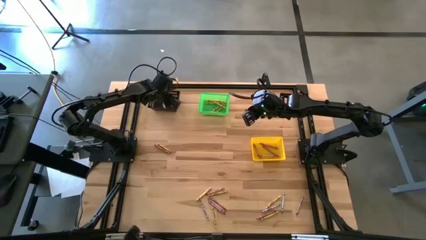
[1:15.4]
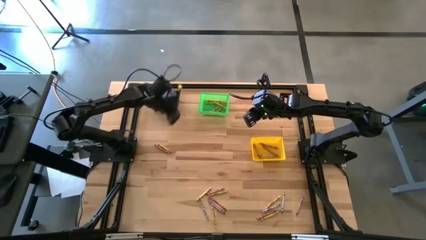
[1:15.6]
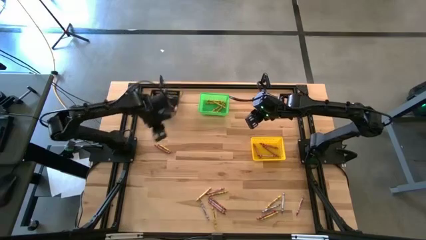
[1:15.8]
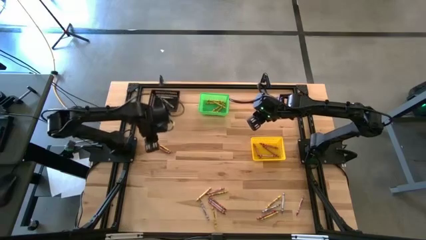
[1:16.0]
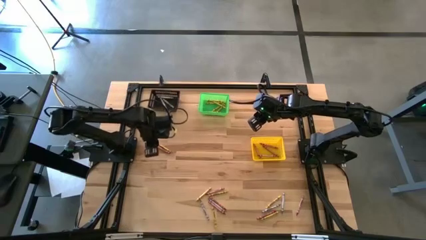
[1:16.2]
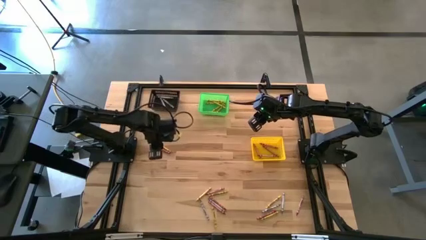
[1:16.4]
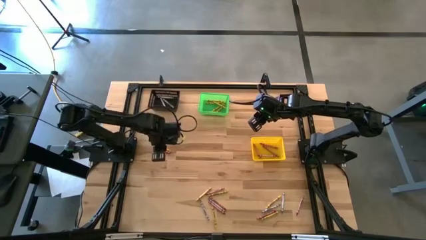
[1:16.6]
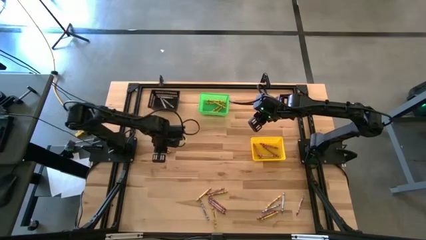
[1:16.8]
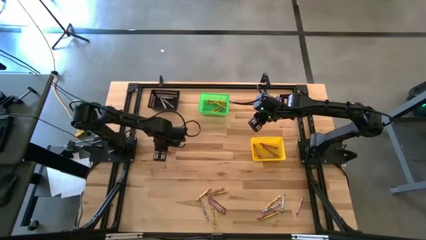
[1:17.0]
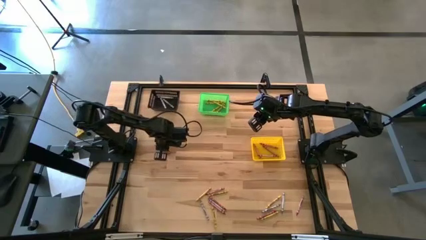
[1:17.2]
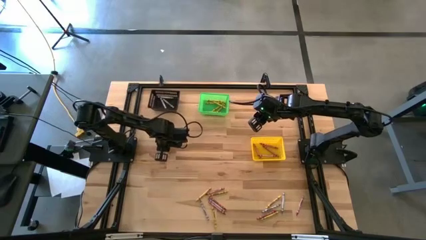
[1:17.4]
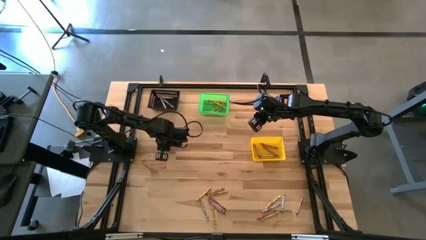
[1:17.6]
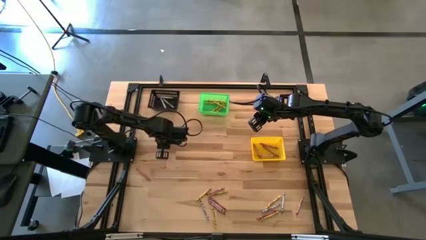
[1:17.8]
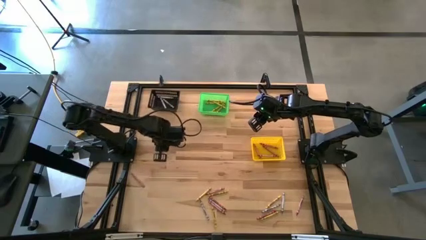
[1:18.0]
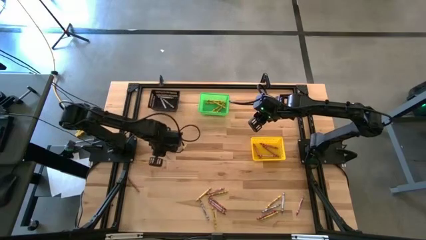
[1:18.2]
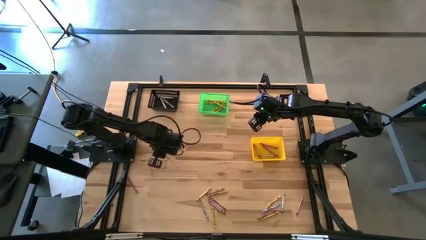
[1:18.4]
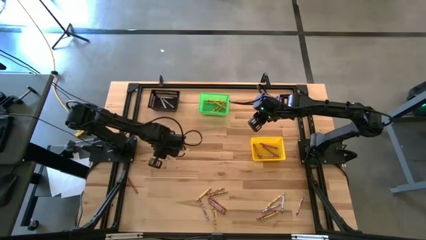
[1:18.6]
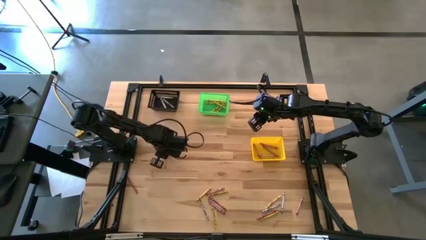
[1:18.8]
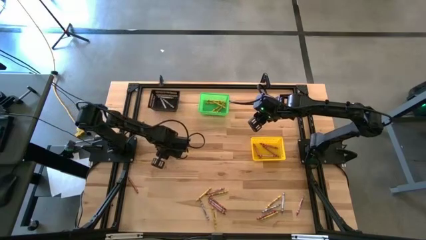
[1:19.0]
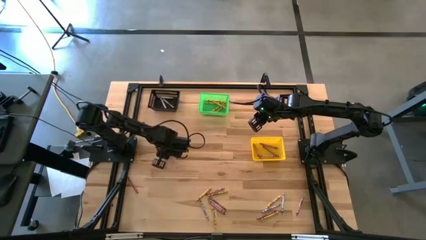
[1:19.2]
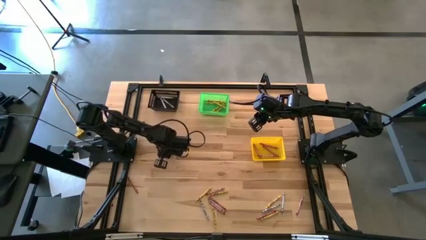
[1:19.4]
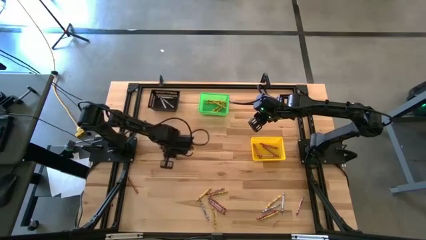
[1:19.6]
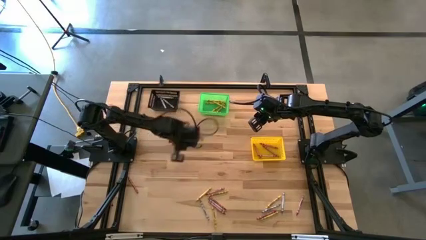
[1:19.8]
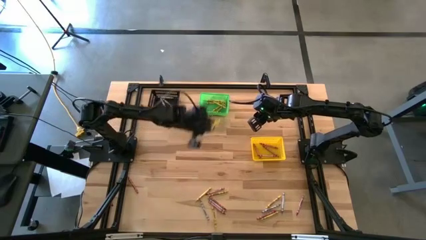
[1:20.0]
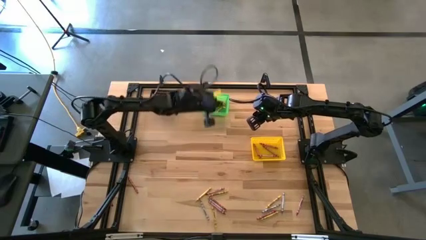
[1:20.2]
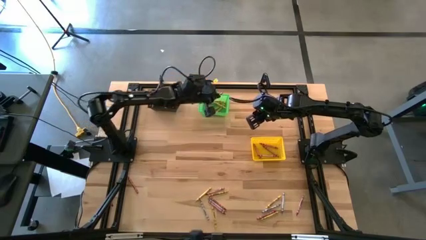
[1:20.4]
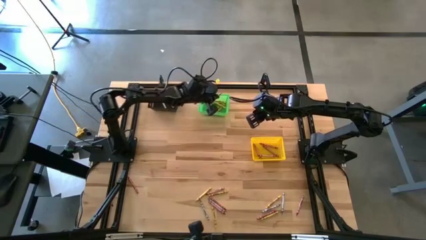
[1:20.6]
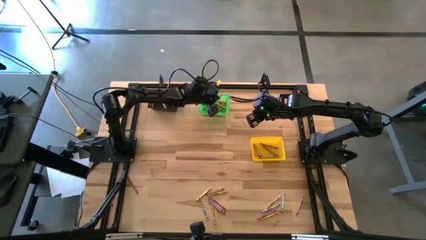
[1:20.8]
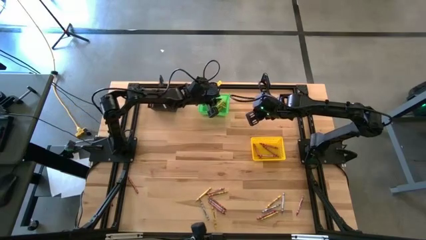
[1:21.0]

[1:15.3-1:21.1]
Task: Sort crayons
Put the yellow crayon into the green basket

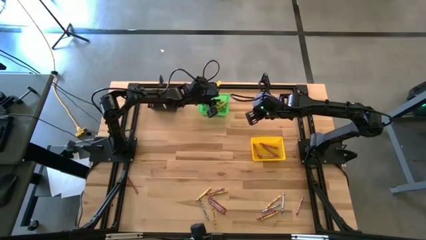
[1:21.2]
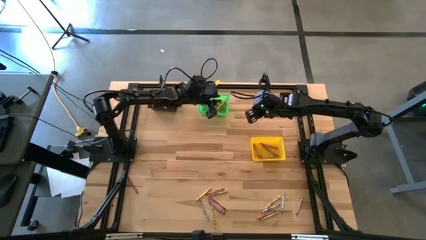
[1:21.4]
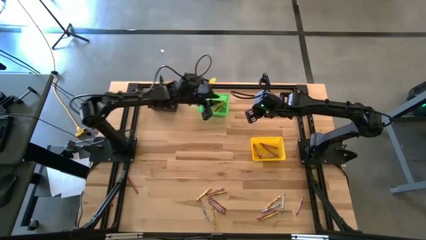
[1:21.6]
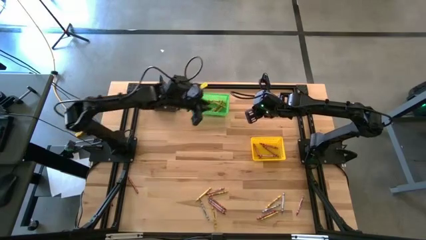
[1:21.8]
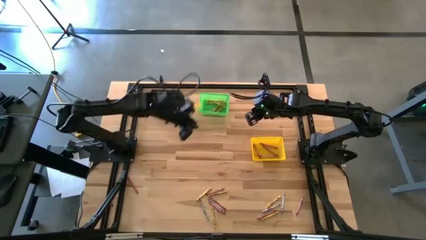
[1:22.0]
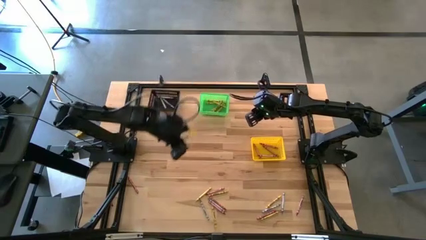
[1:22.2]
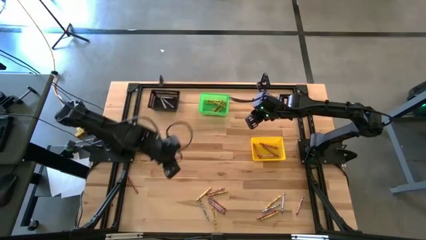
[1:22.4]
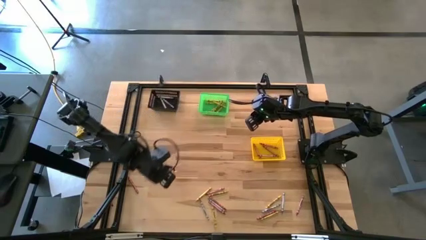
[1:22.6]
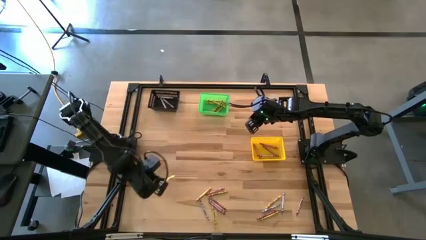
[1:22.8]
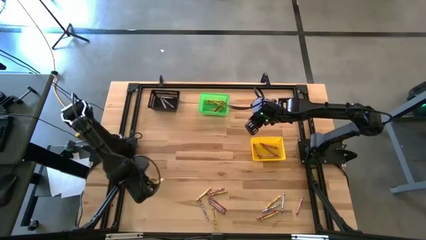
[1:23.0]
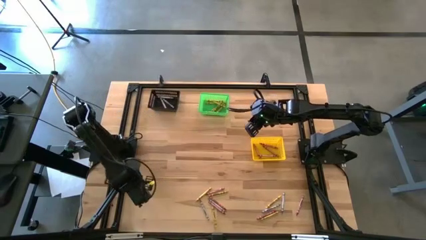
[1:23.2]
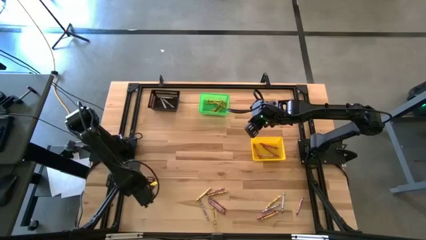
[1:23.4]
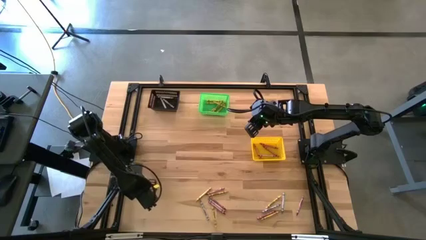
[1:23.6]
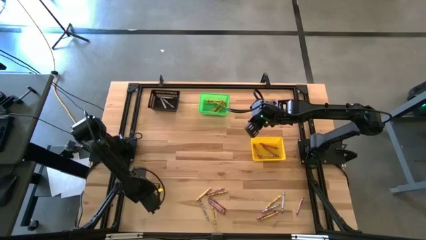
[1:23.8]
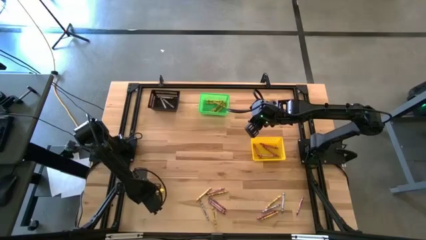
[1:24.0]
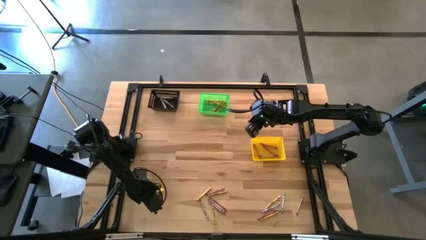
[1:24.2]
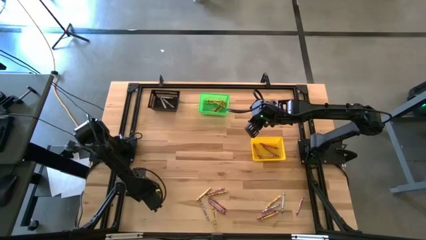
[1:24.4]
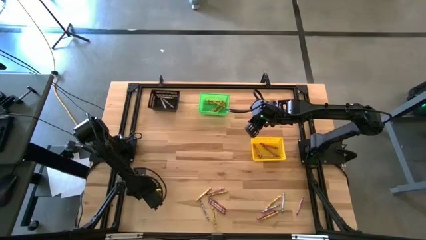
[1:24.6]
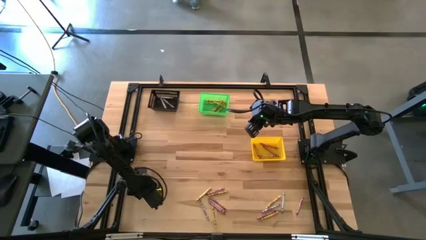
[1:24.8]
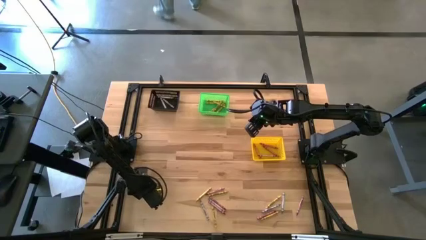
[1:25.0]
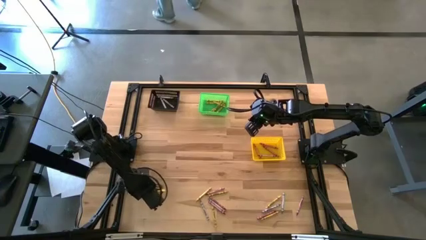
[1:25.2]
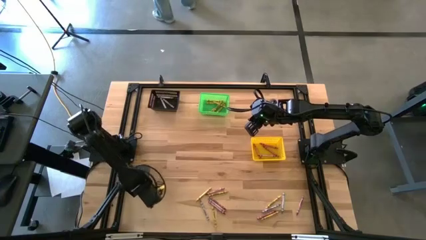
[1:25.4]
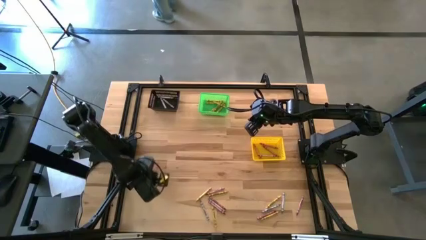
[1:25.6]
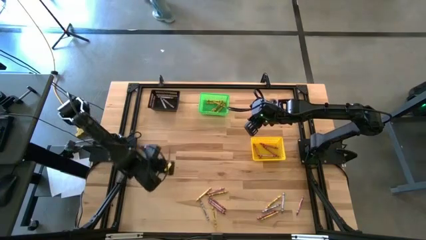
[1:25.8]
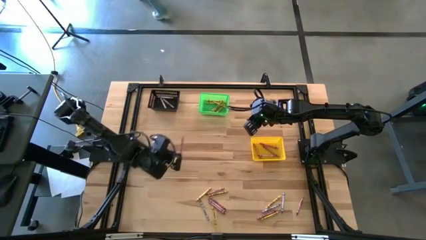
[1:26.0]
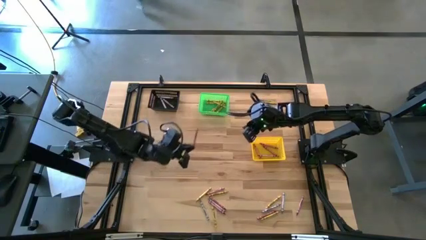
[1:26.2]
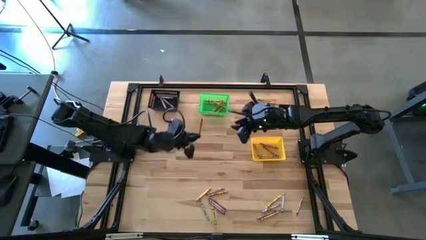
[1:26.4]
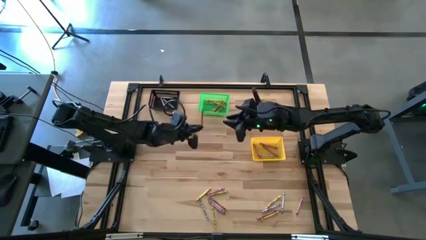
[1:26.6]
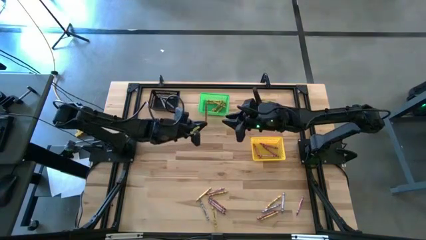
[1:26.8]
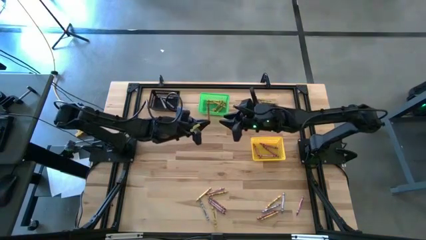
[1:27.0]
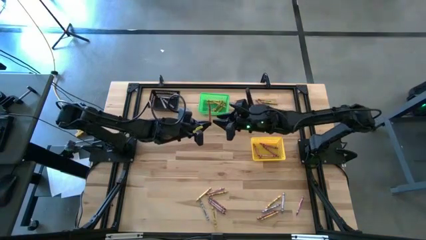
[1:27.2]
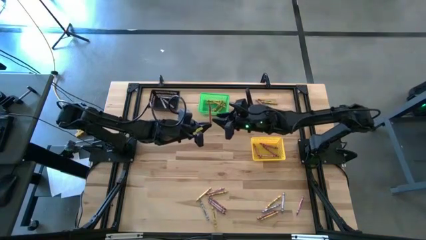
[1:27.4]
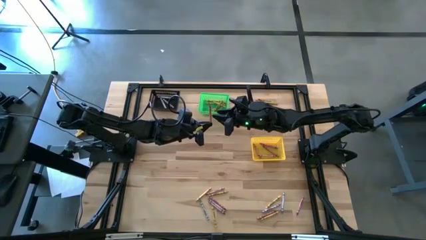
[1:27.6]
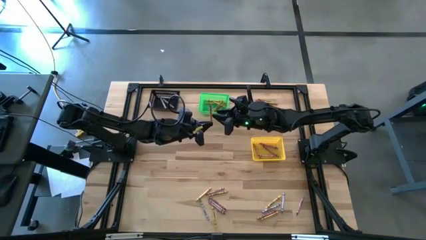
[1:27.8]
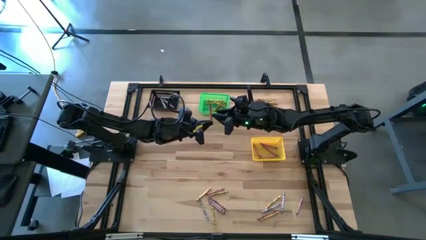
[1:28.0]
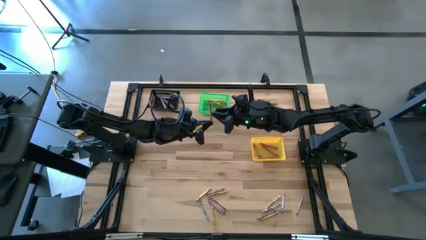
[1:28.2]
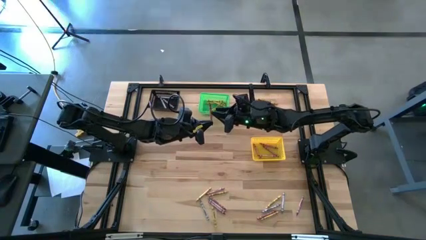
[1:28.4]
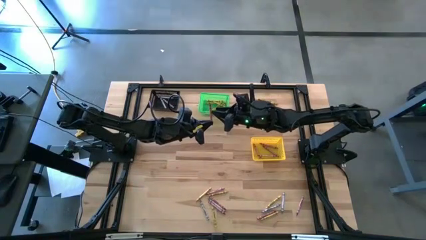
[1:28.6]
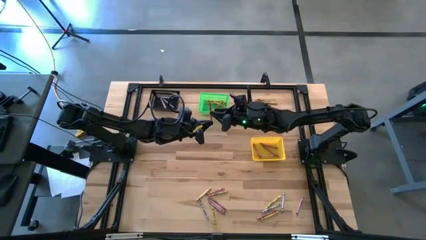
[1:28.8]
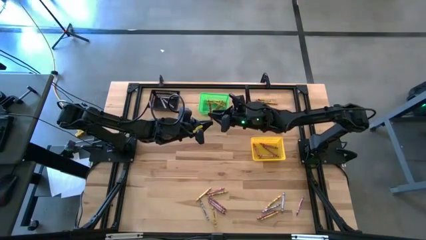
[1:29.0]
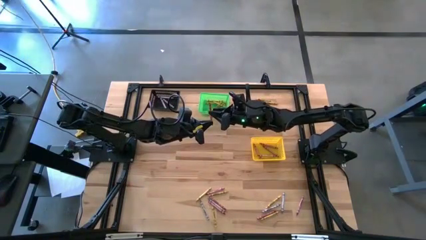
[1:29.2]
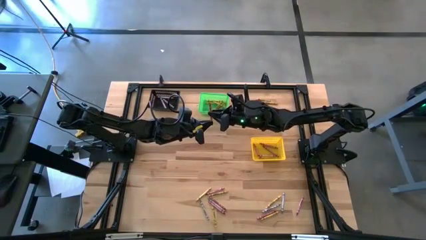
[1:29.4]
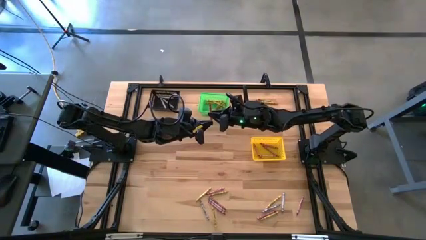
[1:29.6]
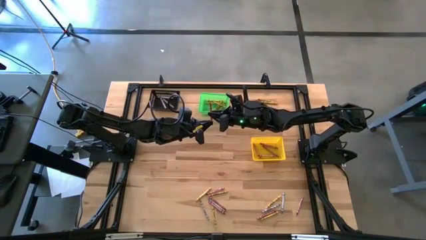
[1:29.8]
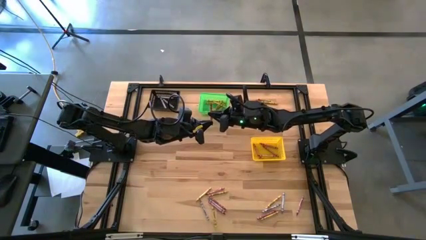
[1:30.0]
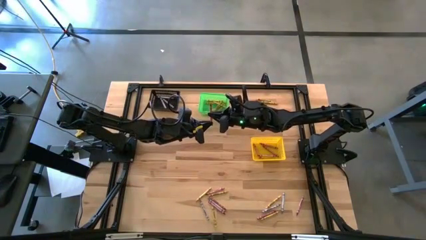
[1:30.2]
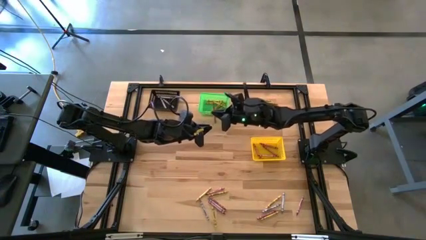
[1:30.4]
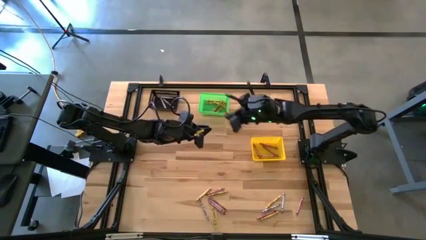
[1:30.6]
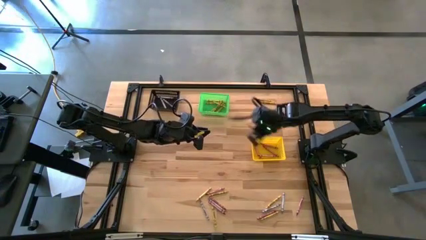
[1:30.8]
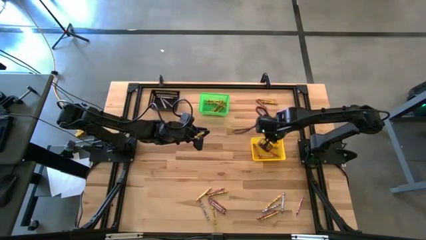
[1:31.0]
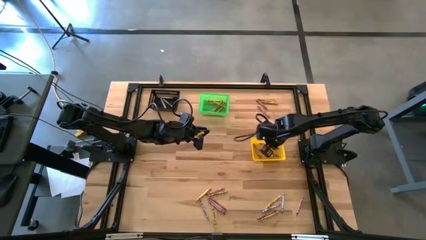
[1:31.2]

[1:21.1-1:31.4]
Put the red crayon into the yellow basket

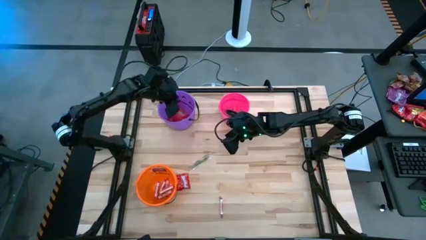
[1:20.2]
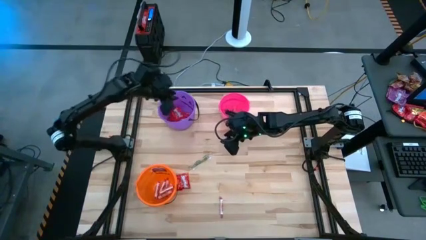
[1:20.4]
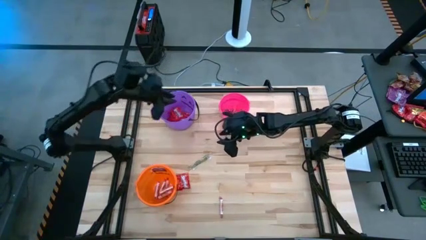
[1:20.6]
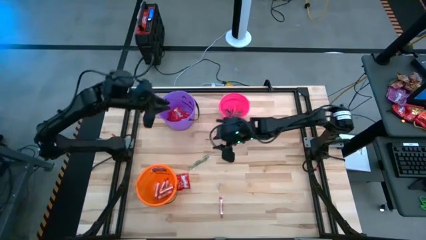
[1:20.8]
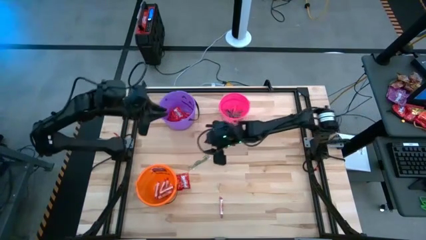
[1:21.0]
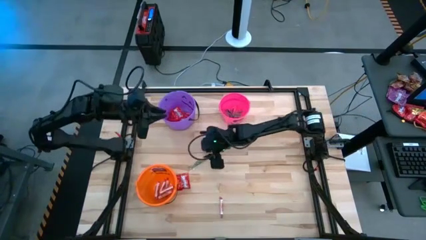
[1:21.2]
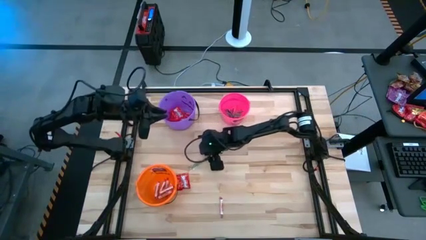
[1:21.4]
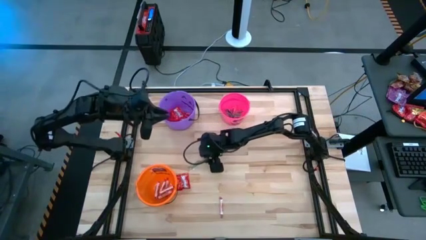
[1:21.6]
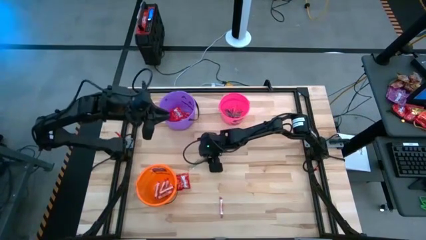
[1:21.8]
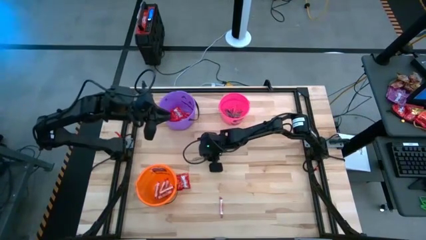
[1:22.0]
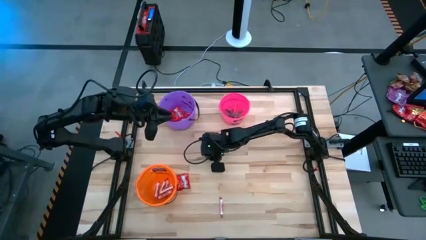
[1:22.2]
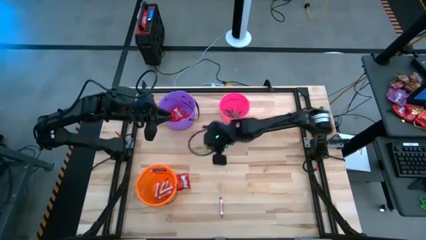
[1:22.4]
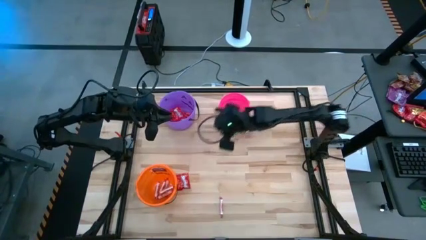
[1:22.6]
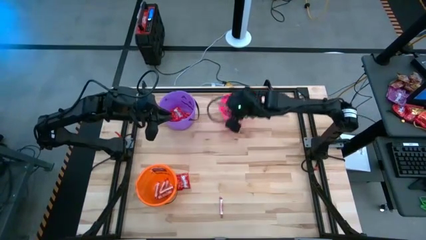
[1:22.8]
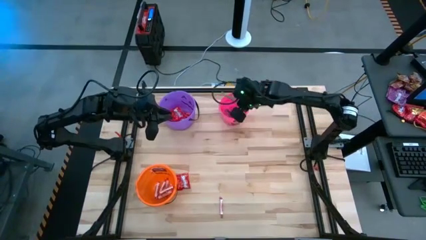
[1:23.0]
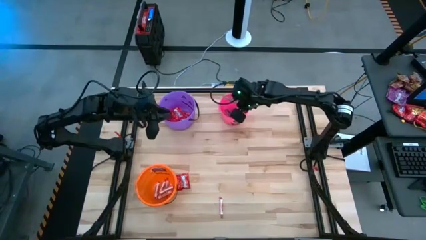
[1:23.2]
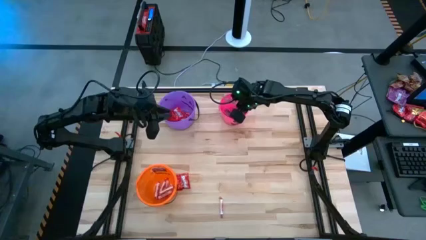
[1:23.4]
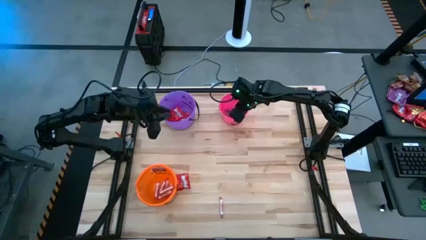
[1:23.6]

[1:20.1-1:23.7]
Task: Sort candy by brand, put in halloween buckets
Put the transparent green candy into the pink bucket
